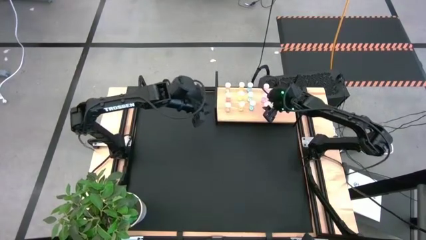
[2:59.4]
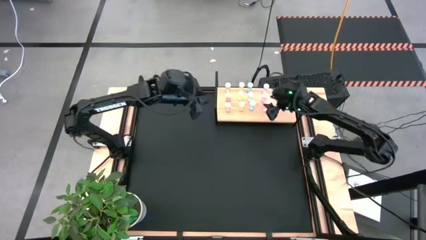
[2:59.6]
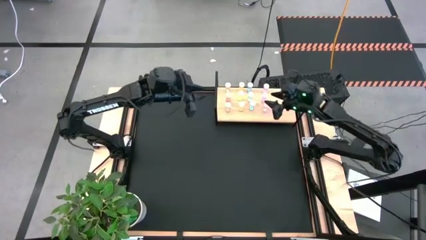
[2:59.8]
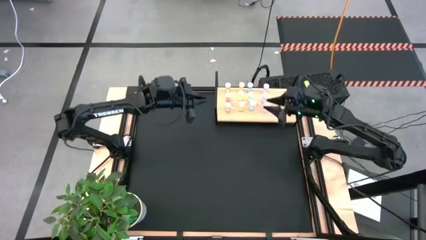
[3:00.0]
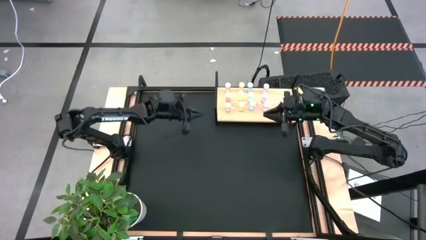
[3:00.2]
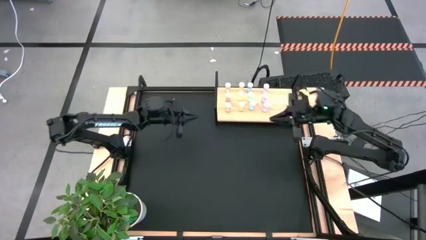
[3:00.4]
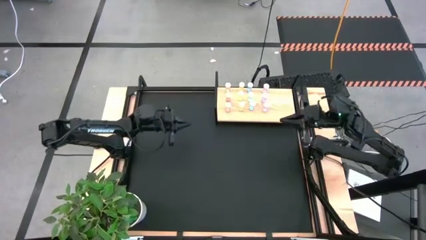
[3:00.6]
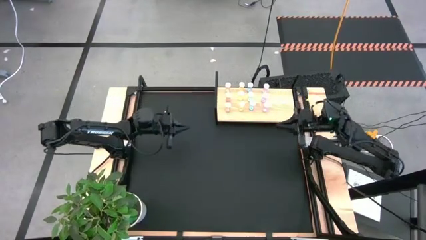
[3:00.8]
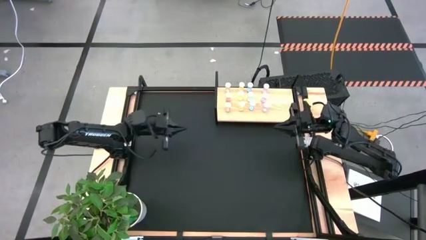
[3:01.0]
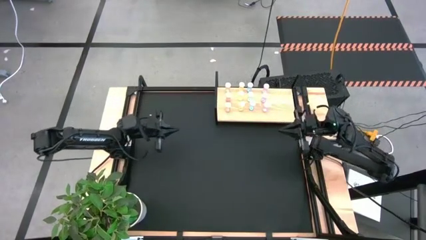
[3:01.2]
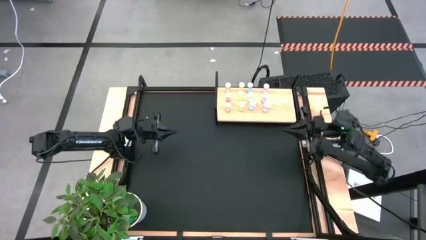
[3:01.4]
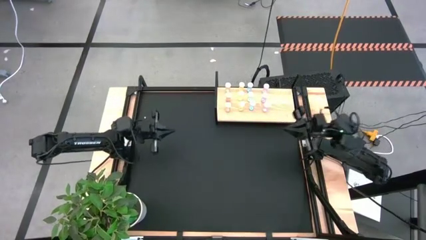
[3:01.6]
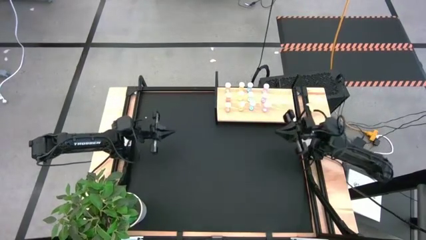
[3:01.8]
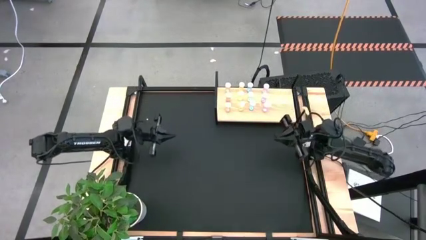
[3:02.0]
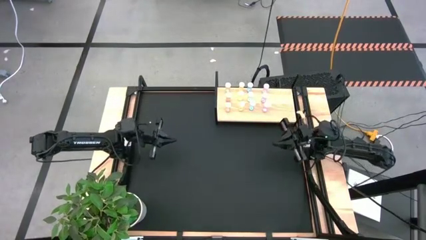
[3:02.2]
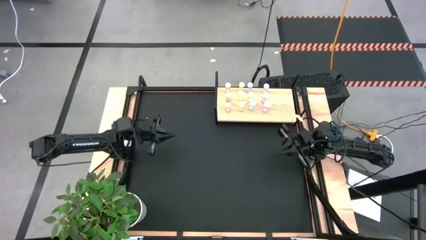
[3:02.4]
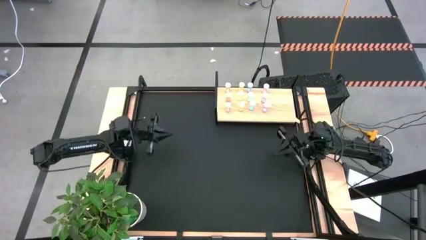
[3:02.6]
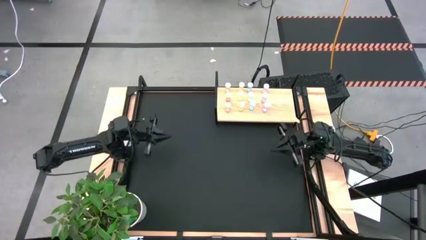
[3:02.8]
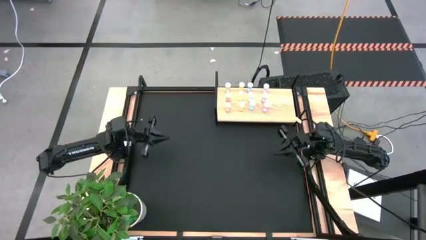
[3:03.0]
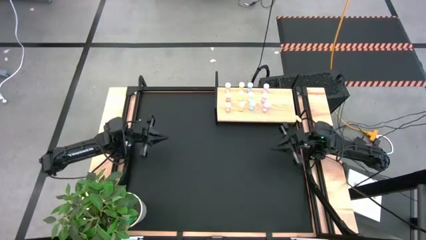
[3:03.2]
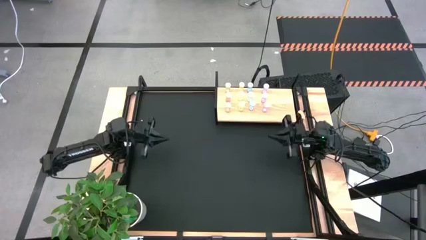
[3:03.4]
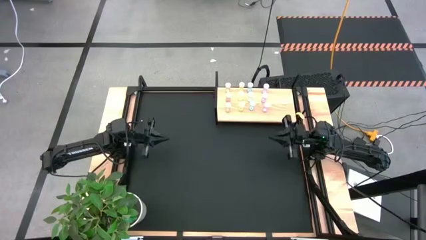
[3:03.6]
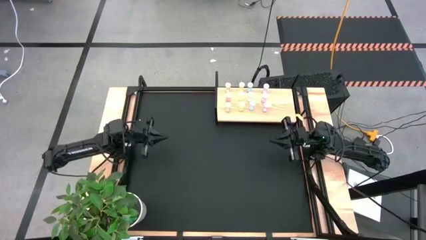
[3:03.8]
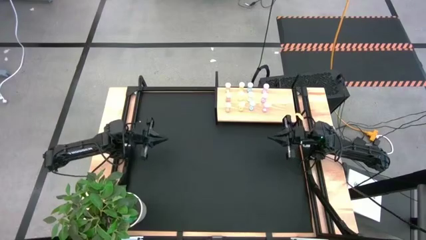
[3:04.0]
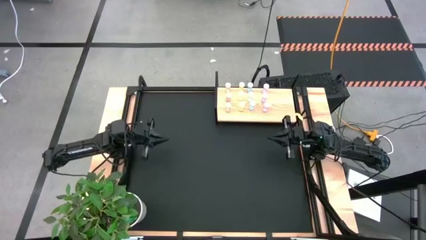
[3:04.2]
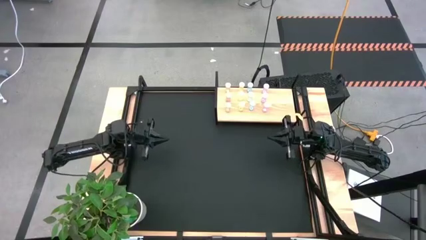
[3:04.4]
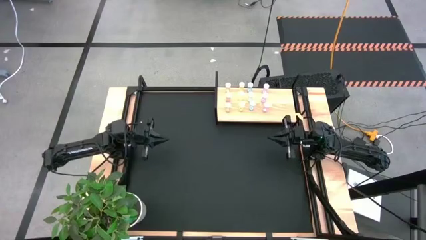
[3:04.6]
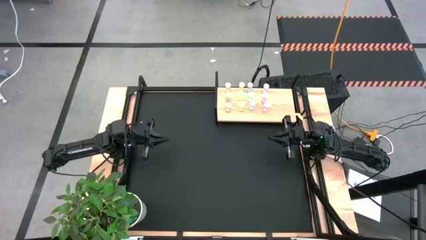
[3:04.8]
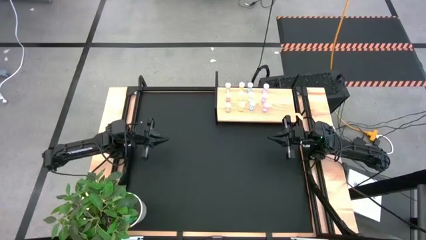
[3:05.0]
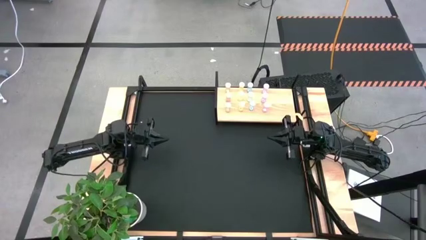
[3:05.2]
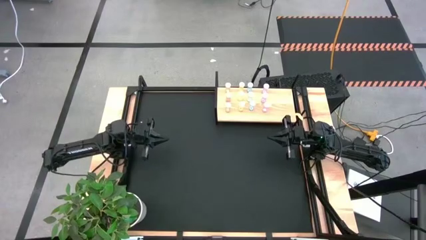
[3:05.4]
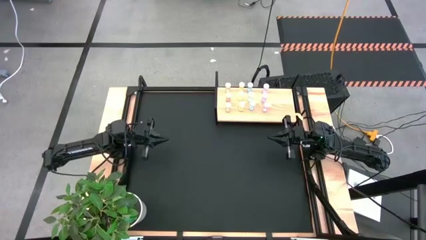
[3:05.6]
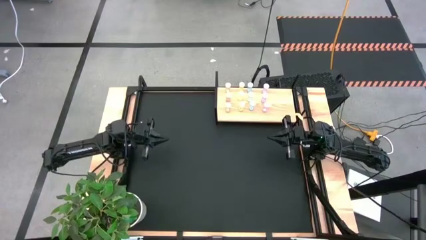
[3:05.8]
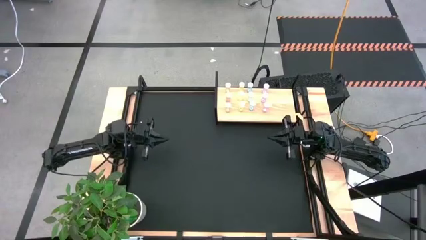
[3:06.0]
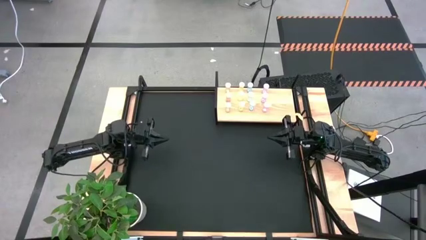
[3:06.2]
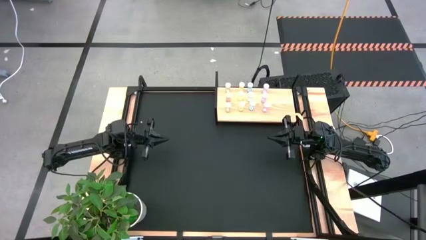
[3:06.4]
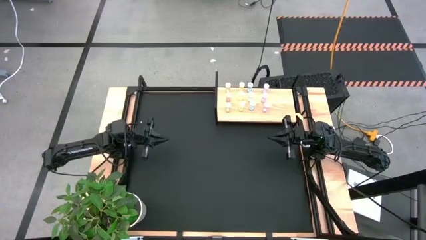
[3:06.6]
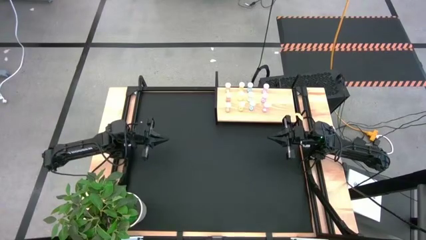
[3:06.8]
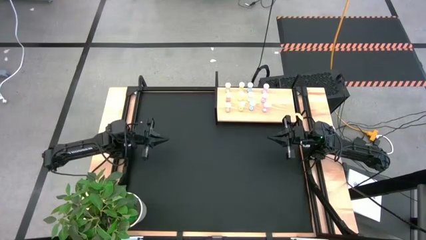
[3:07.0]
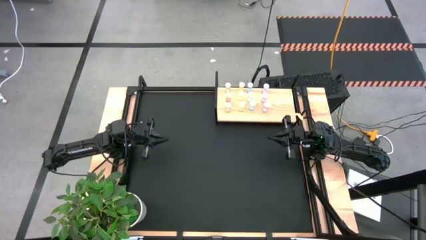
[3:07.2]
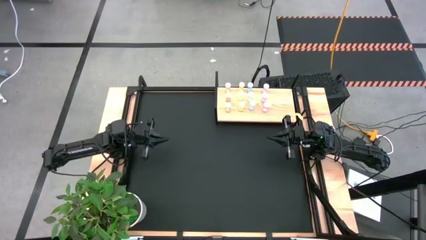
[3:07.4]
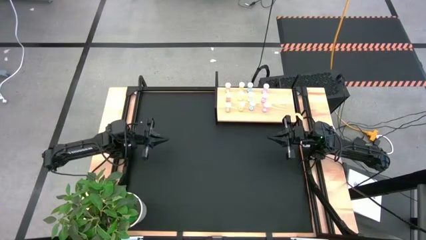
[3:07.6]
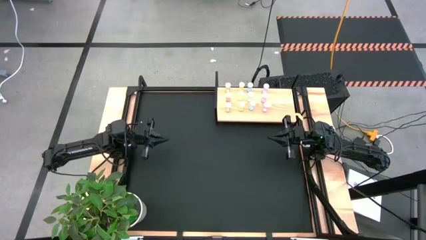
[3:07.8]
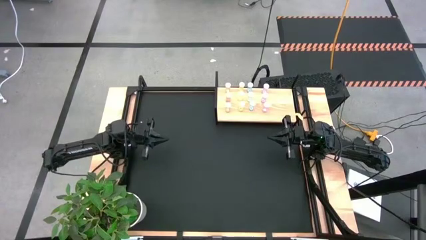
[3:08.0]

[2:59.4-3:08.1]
Task: Pick and place medicine bottles onto shelf by color
Return to Home Position

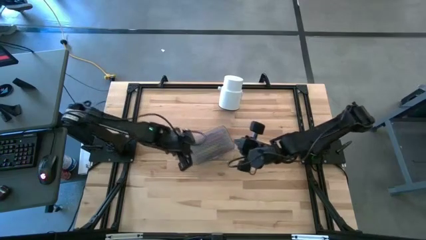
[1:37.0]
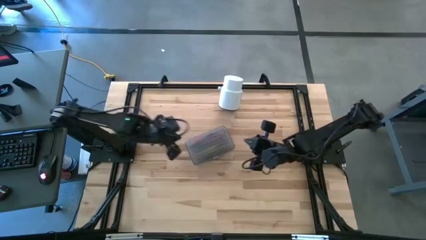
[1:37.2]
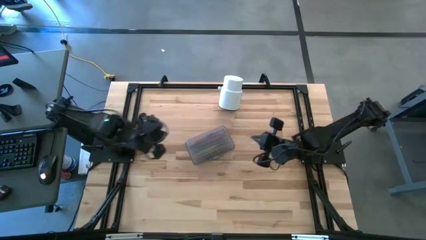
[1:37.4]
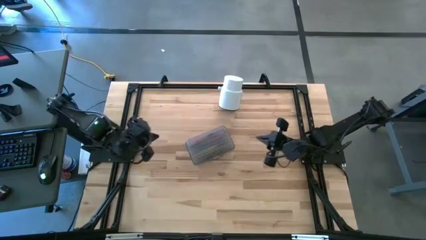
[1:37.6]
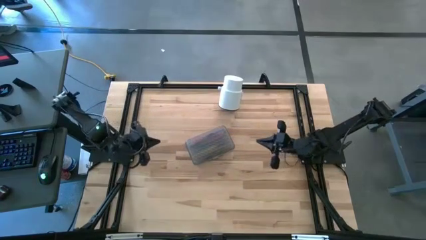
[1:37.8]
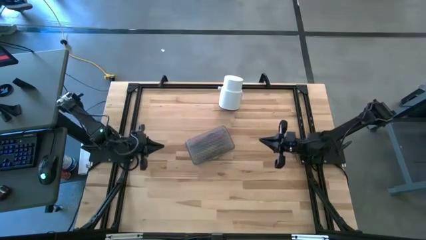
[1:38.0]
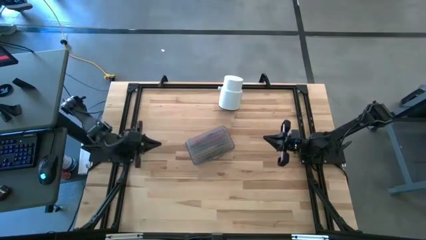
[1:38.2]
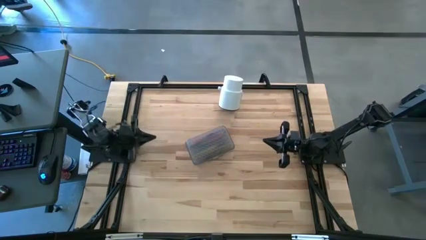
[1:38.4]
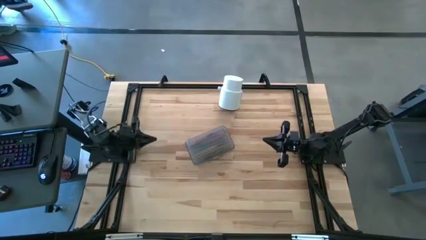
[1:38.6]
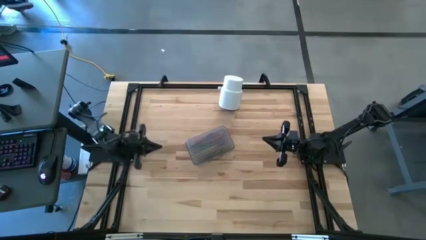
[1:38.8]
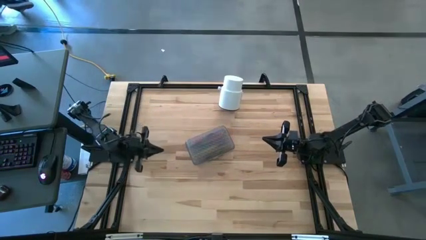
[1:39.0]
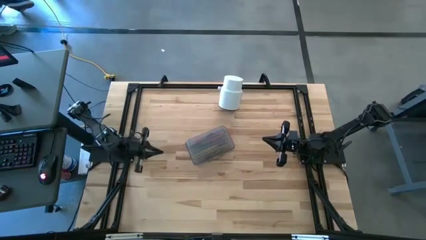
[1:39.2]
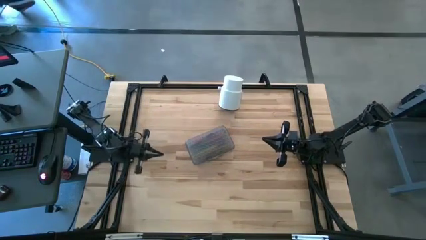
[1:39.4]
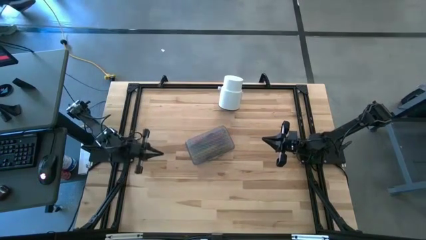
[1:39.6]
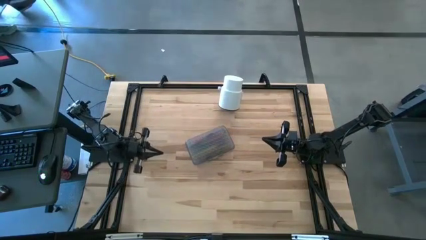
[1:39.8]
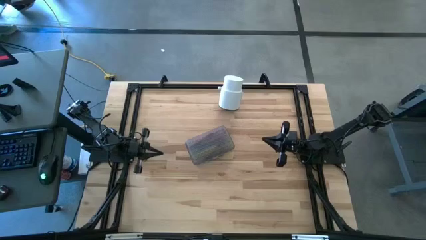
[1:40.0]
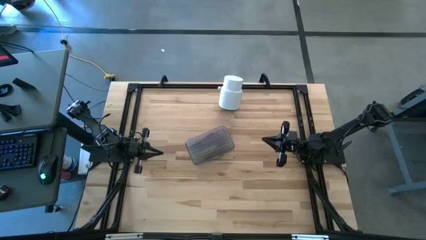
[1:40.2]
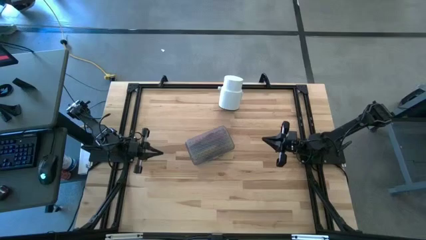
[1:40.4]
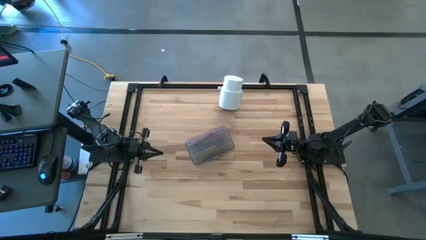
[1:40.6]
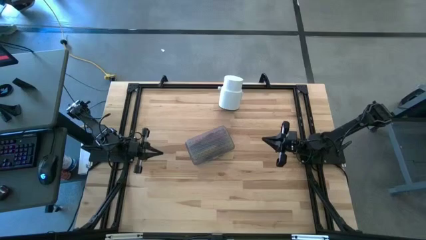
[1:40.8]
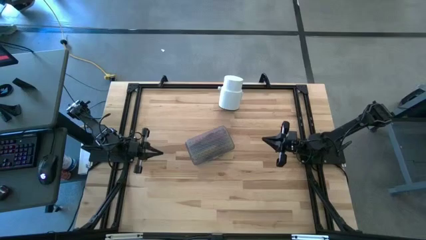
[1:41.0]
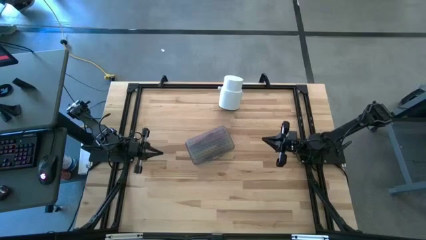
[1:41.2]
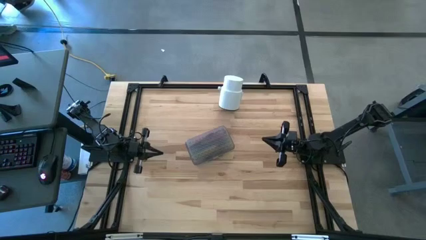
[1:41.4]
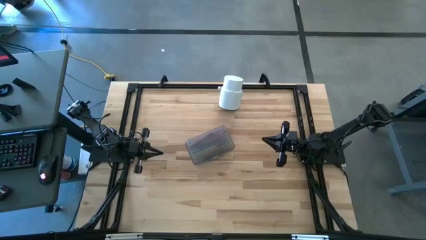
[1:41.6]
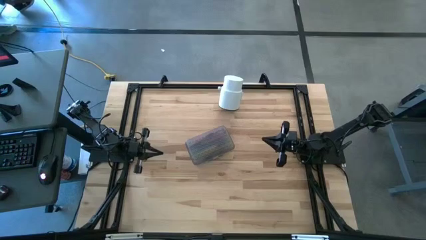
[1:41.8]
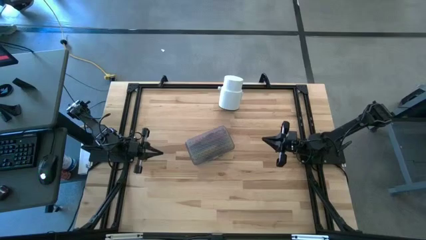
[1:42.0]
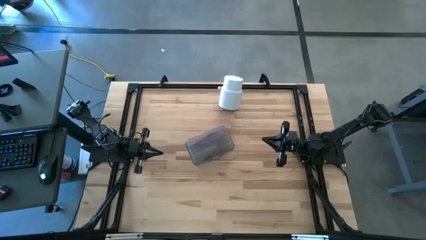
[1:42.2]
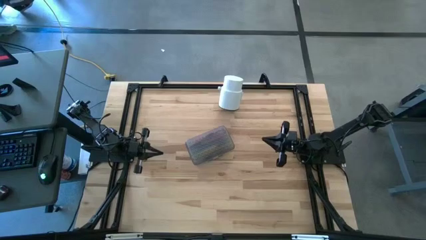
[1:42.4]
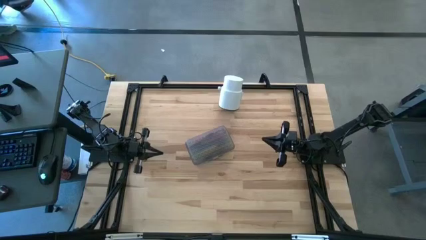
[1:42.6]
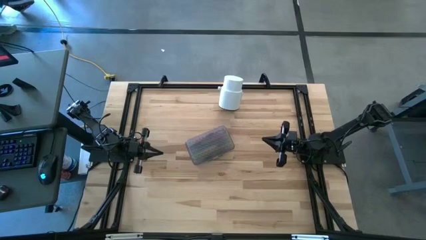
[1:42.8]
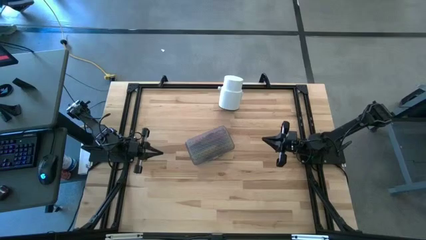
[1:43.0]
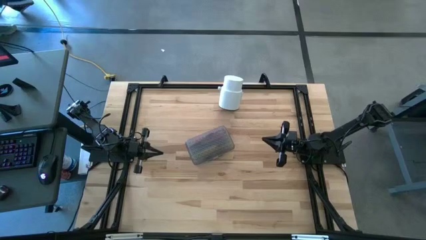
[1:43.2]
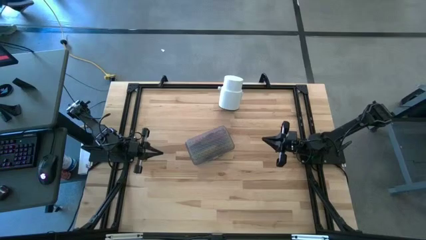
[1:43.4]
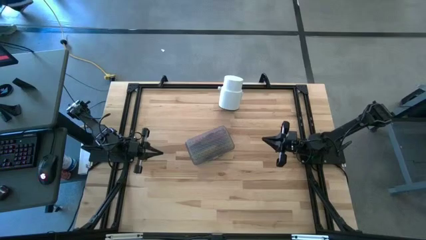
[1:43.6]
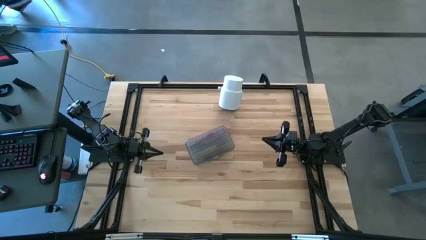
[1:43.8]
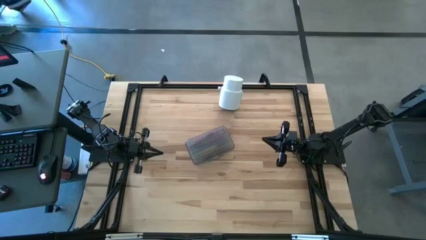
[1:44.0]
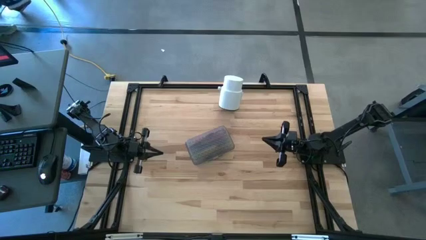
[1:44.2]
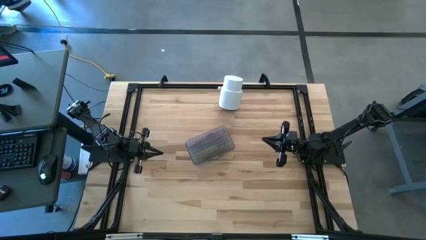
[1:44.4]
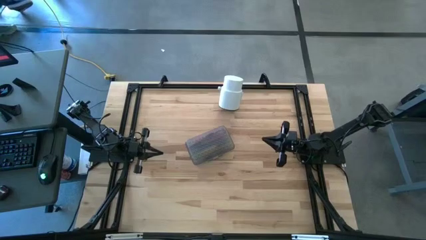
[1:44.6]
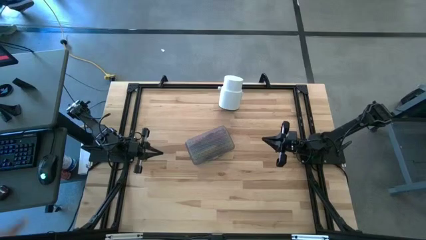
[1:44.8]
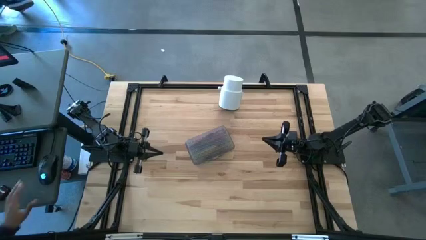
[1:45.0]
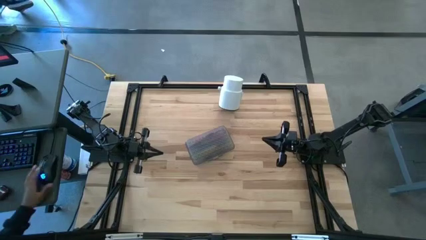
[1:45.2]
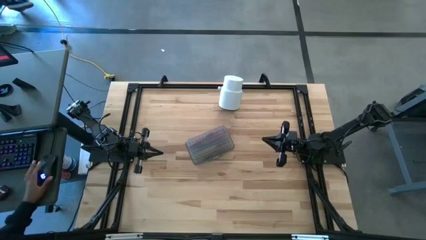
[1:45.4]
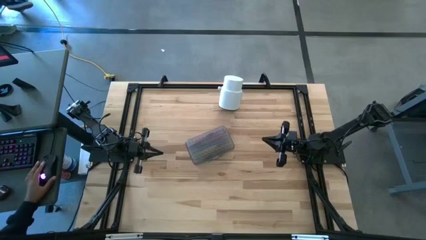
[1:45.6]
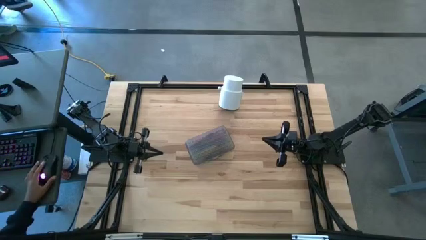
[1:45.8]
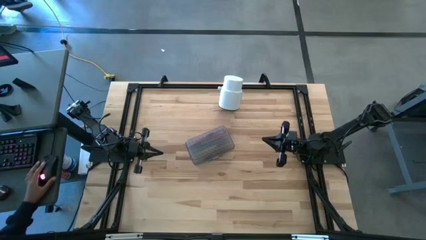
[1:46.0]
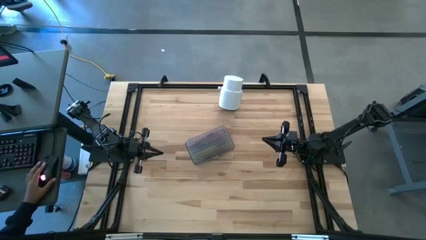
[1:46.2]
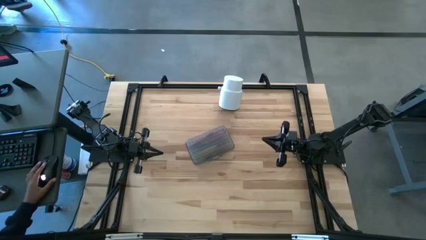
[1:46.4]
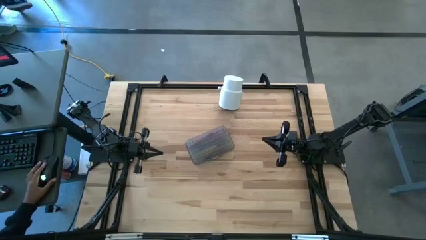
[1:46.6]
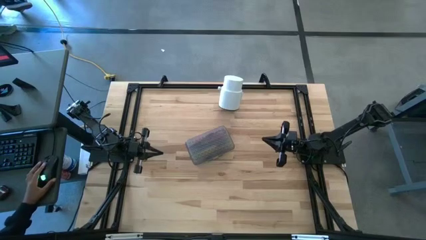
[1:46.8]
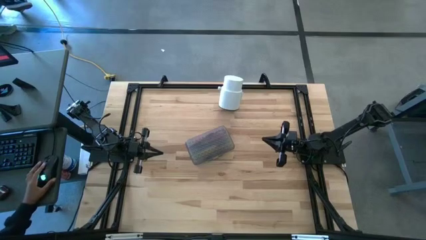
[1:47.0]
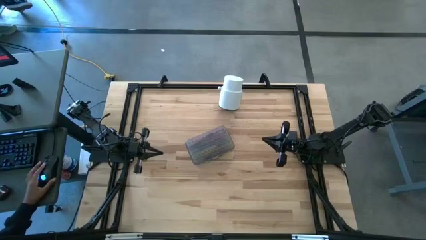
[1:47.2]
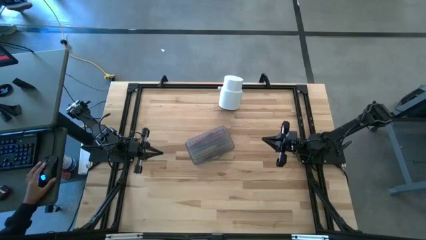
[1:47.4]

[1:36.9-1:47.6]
Task: Pick & place school supplies into a supply box
Return to Home Position
